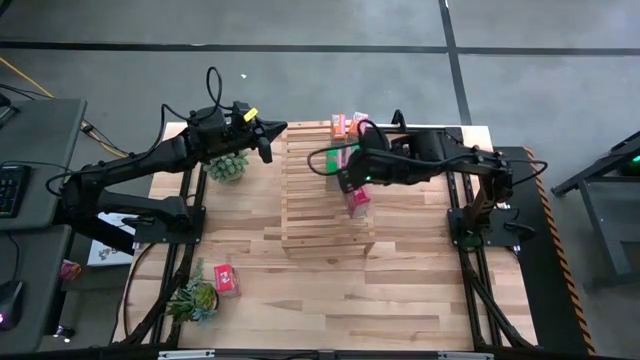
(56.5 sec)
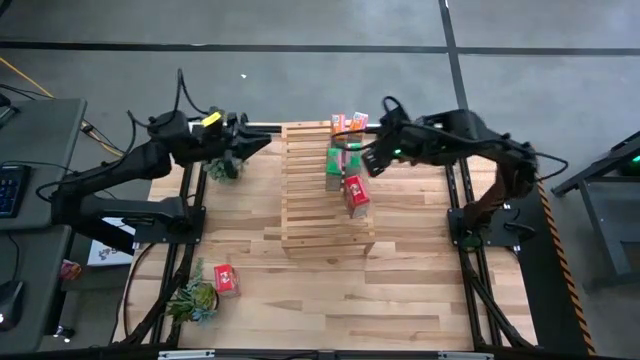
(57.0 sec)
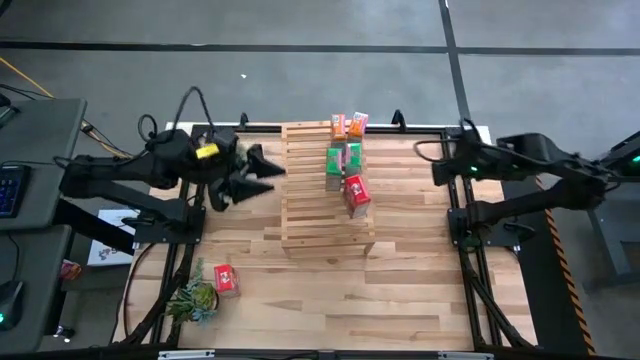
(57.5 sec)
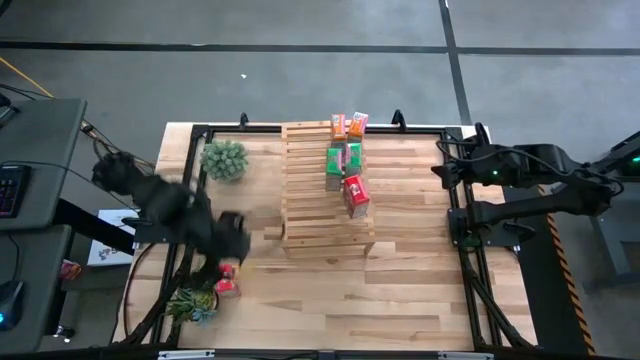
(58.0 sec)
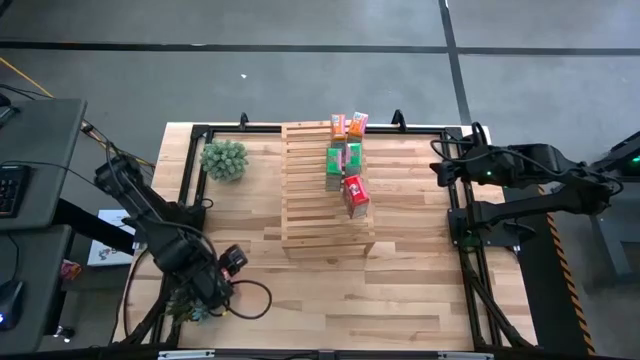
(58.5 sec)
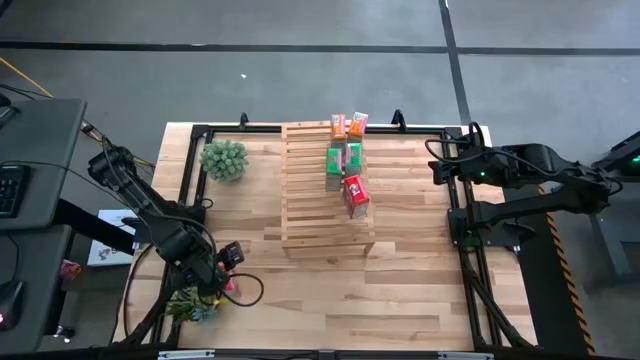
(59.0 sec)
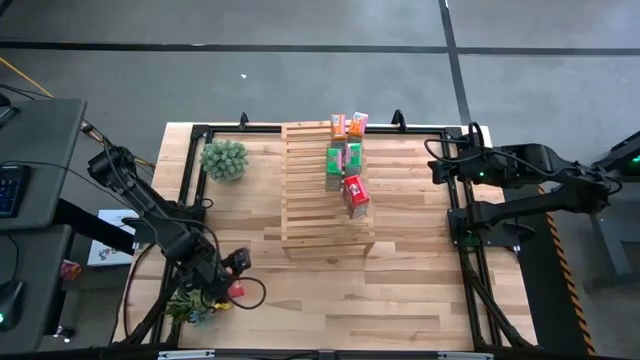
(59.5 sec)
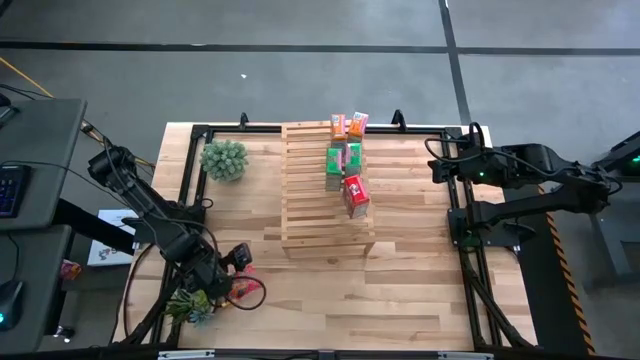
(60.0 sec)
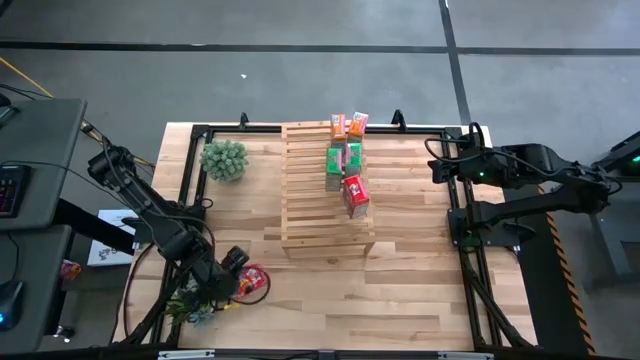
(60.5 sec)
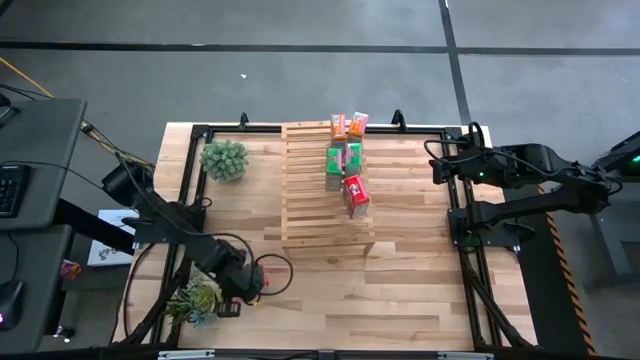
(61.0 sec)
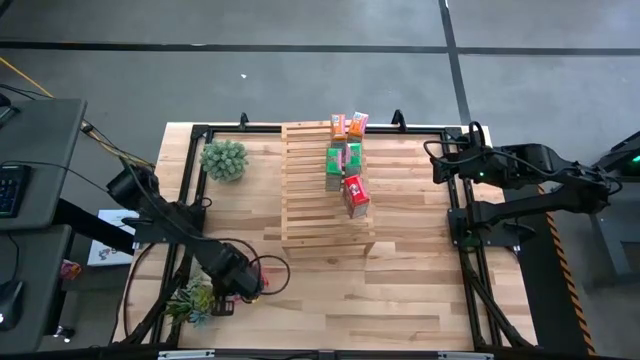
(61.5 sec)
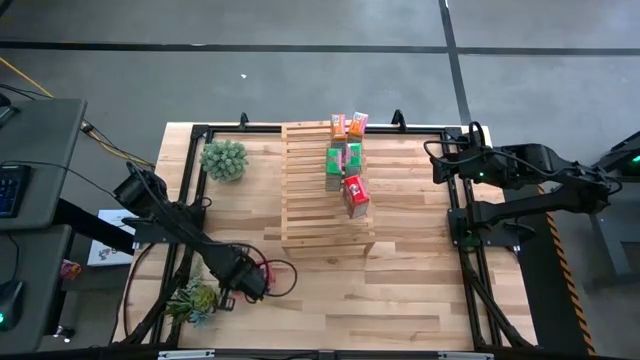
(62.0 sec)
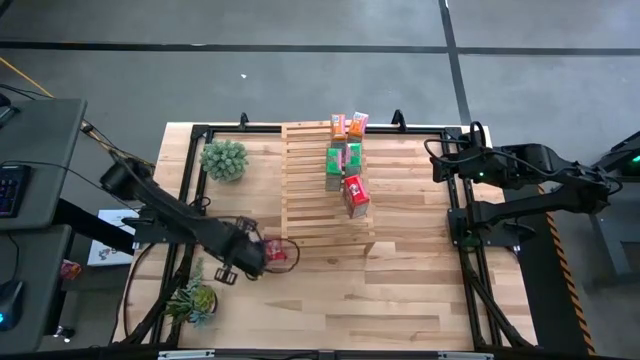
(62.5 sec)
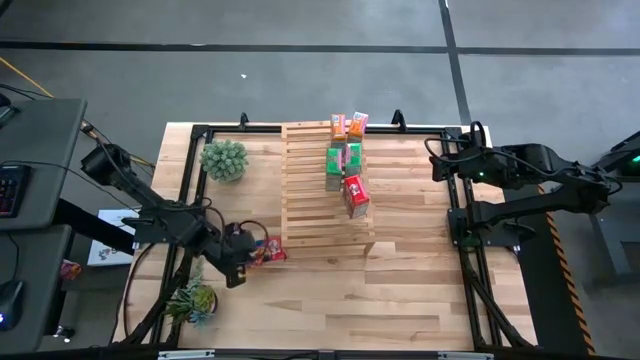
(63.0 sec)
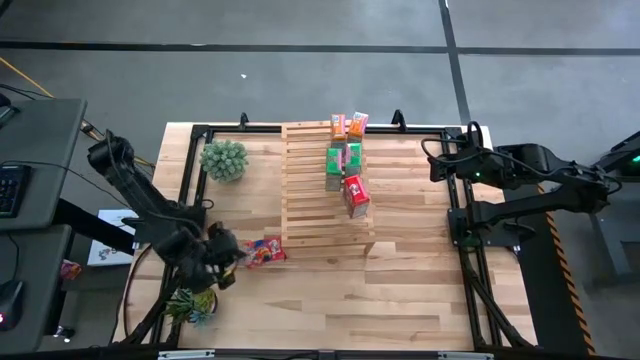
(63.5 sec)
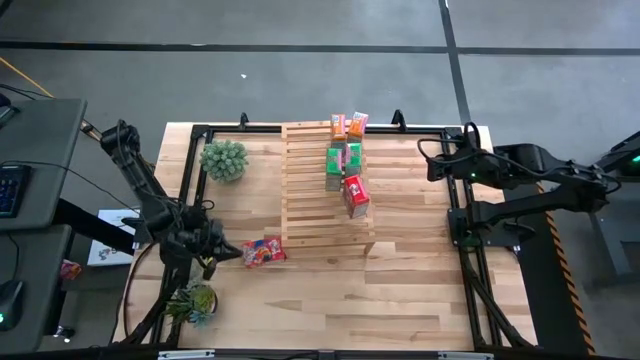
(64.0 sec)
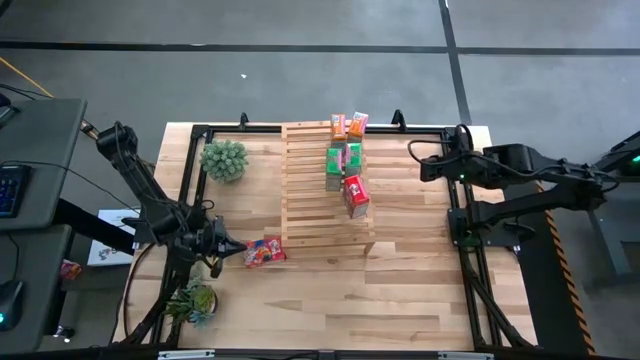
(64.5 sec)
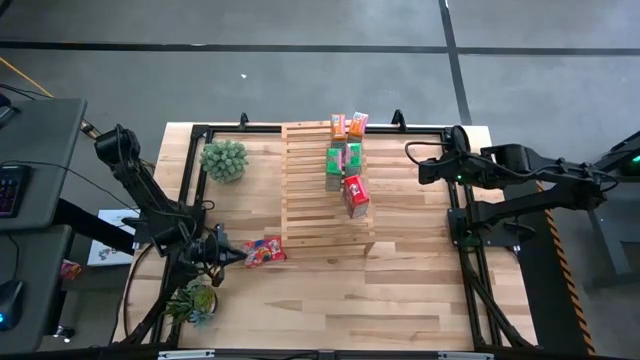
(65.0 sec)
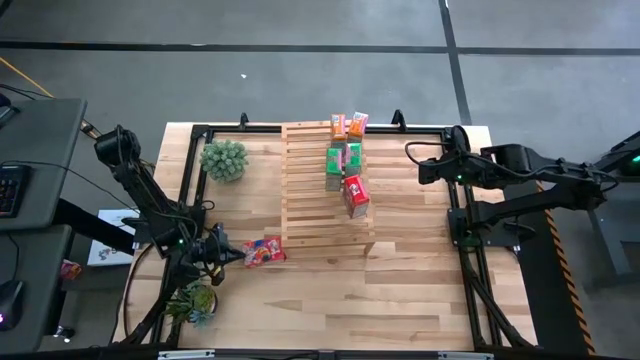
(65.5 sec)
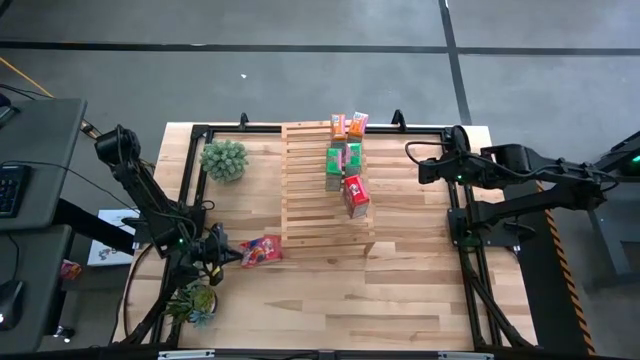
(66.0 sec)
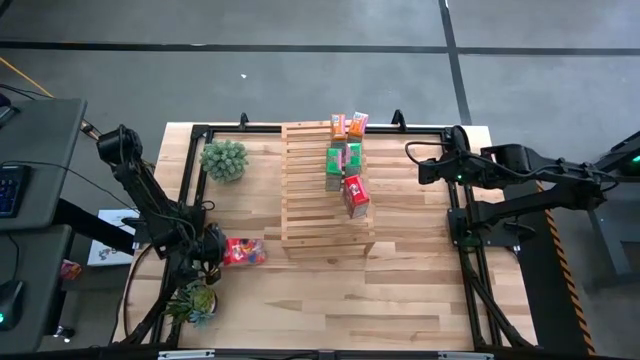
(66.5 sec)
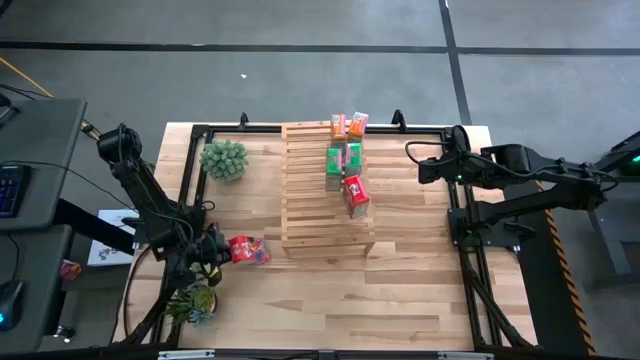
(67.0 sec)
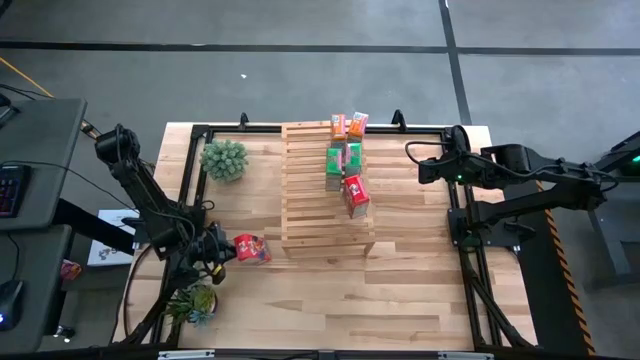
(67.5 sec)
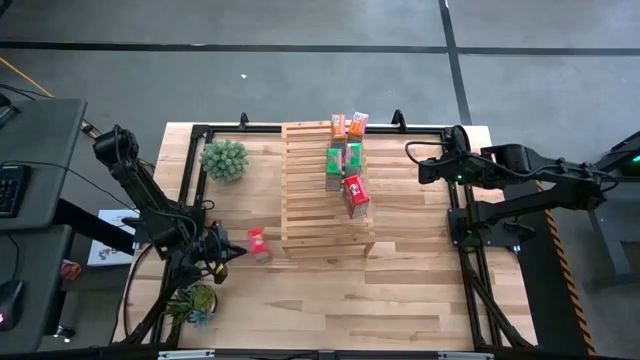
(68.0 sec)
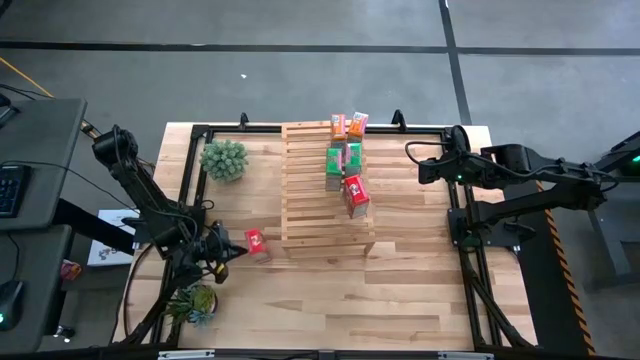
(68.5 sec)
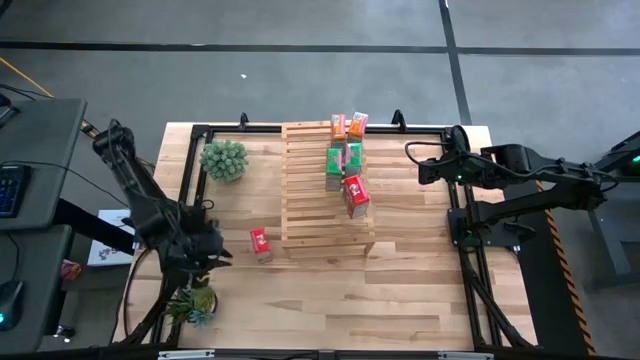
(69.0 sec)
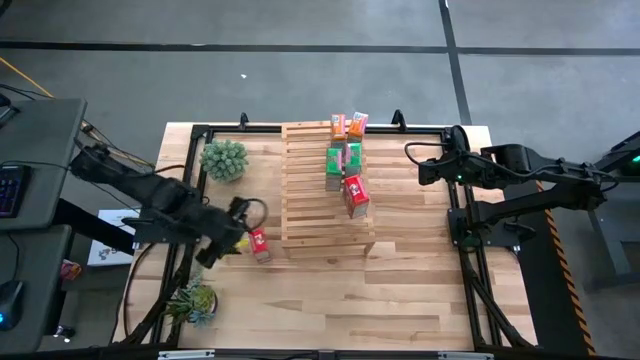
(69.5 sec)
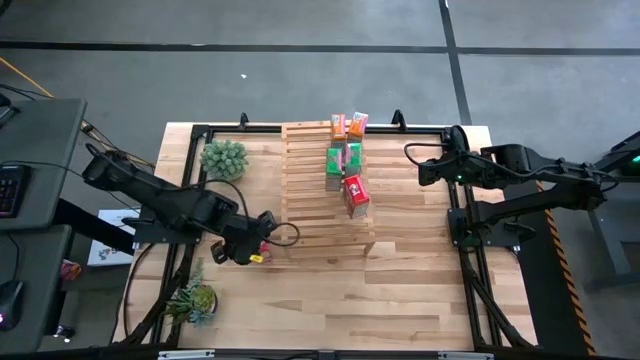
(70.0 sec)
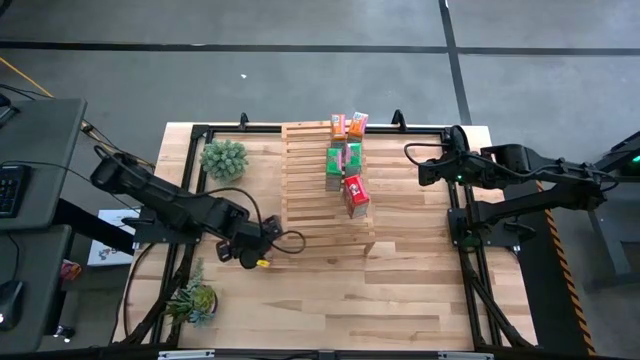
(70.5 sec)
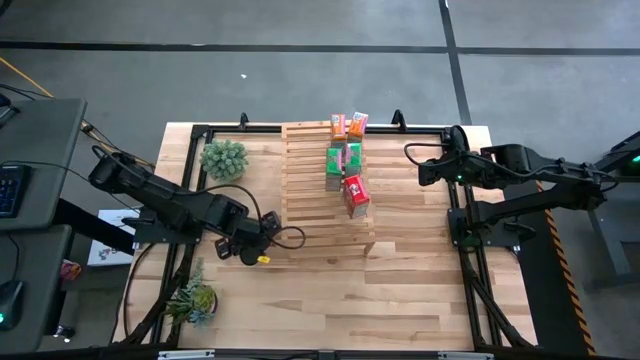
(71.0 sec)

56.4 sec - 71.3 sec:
Task: Stack cereal on shelf
Put the red cereal box on the shelf aligned with the other red cereal box

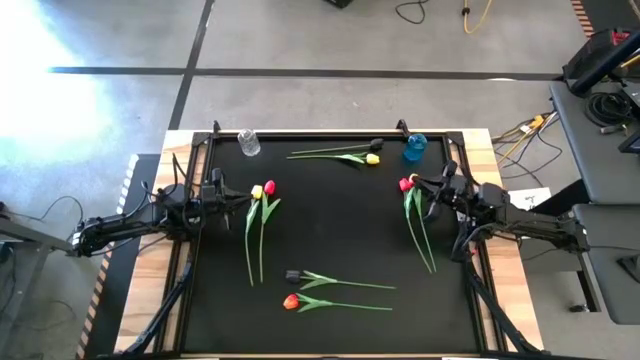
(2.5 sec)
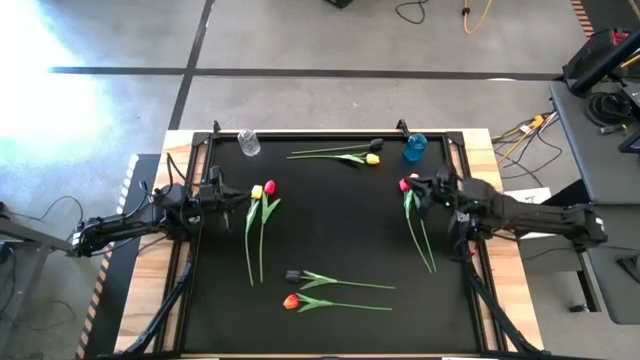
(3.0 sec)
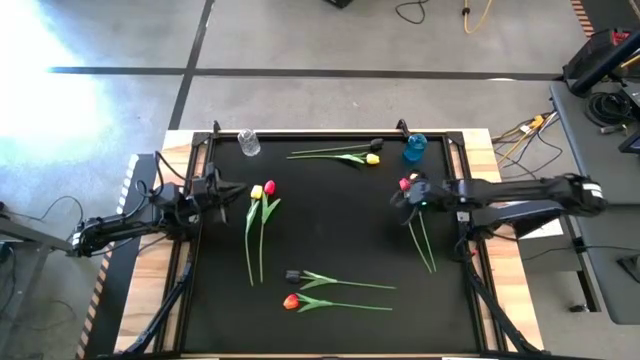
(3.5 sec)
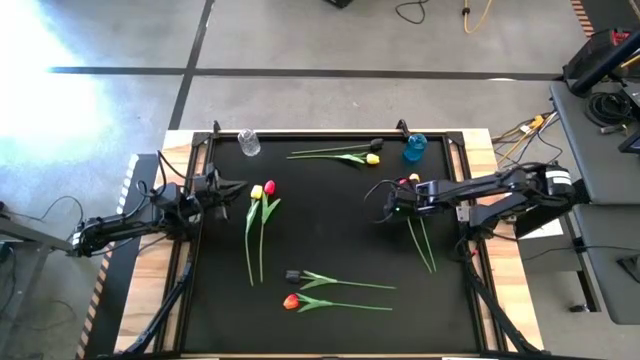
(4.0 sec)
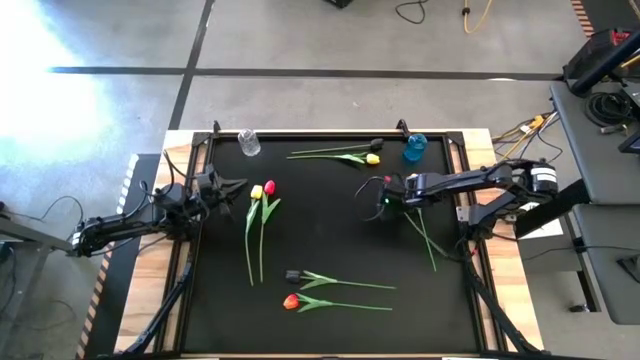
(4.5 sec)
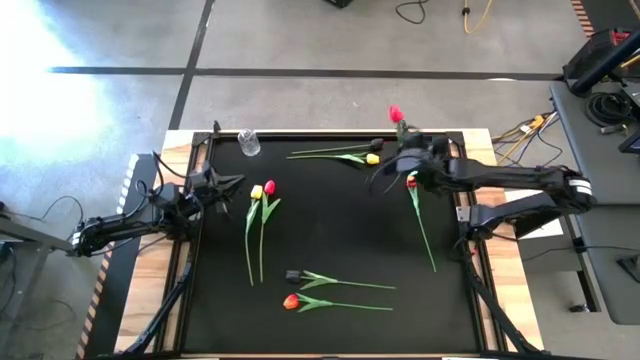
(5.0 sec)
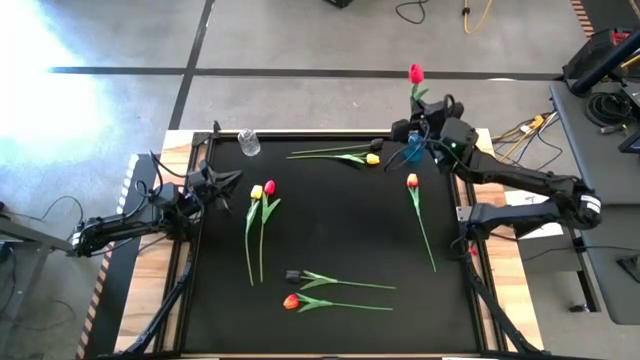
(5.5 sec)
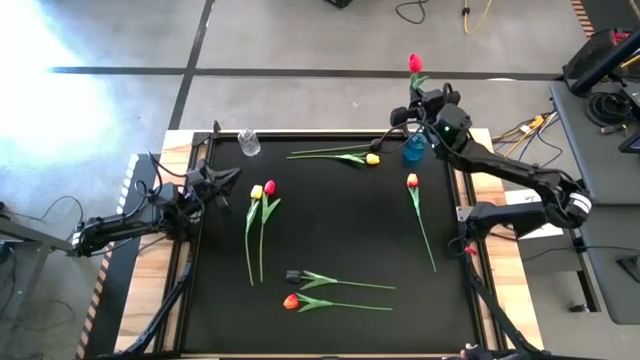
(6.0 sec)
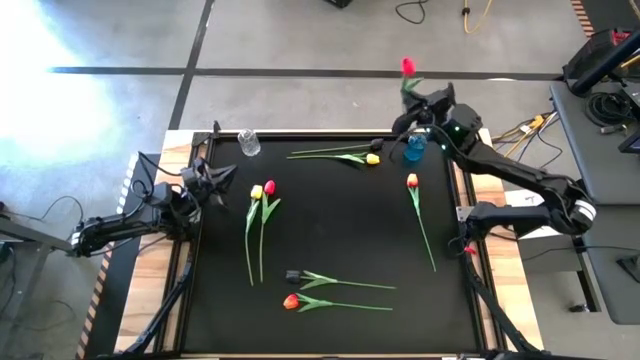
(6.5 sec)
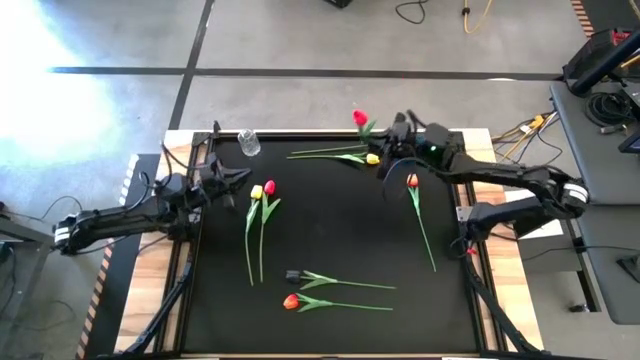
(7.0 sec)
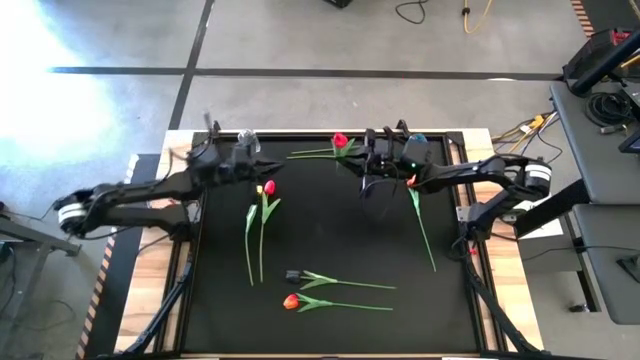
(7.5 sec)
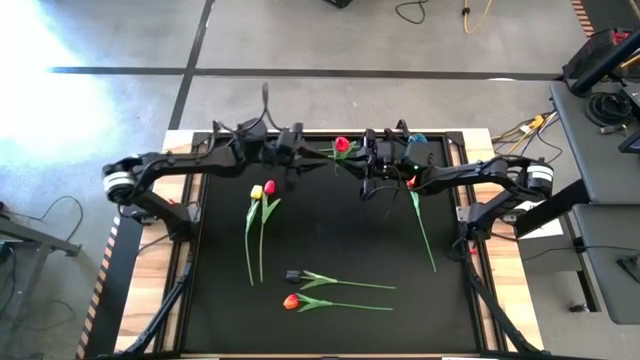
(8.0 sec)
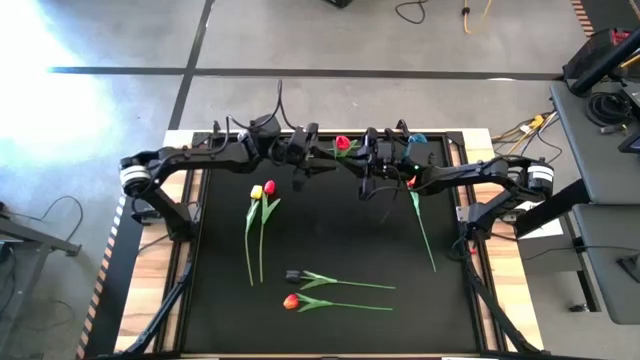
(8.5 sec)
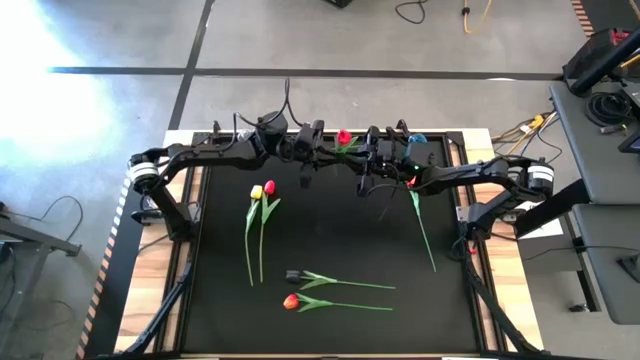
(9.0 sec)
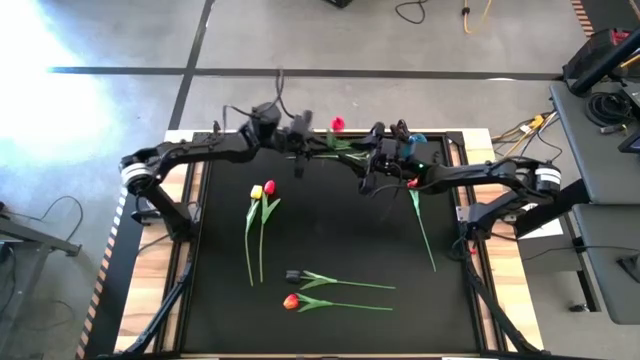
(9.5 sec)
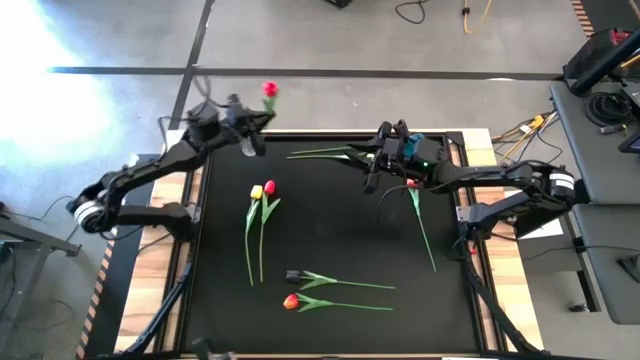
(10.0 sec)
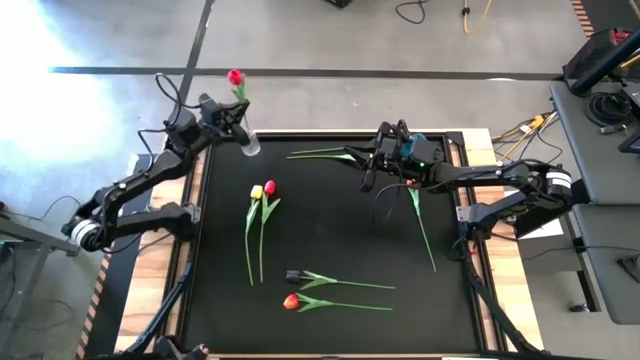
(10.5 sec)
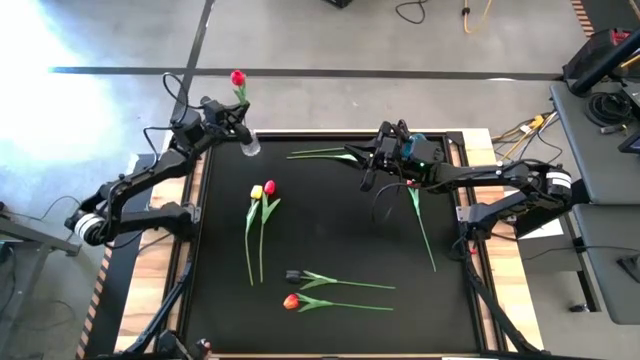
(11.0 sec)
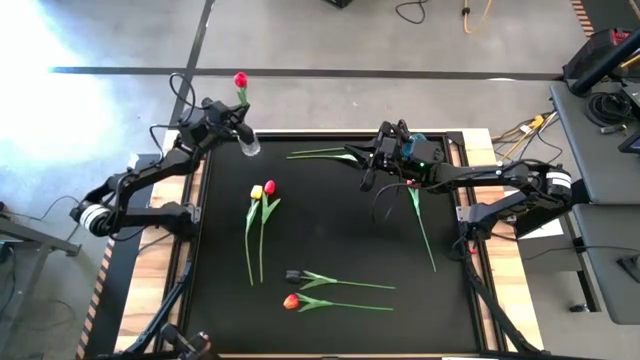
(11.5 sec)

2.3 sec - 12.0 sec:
Task: Sort flowers into vase by color
Put the right red tulip into the transparent flower vase
